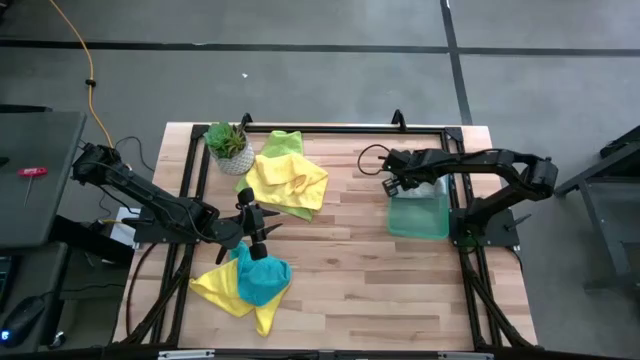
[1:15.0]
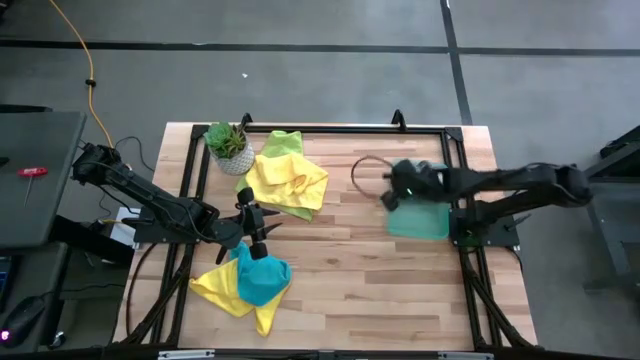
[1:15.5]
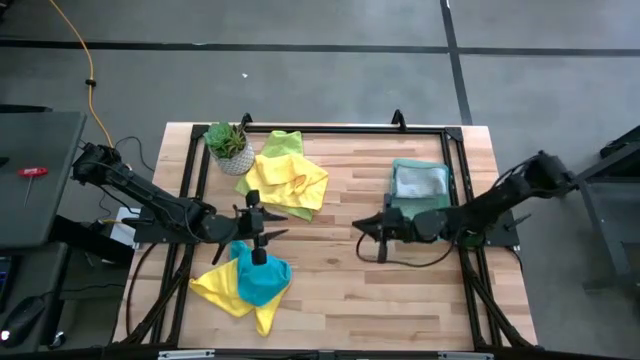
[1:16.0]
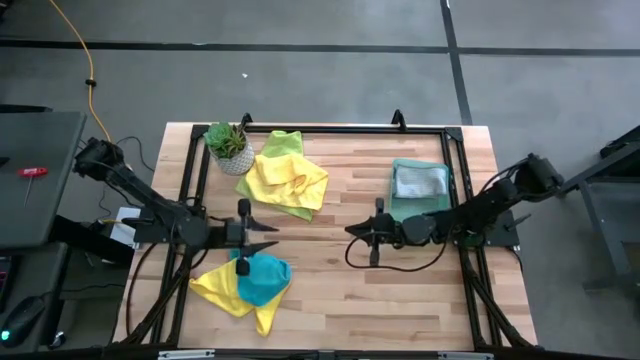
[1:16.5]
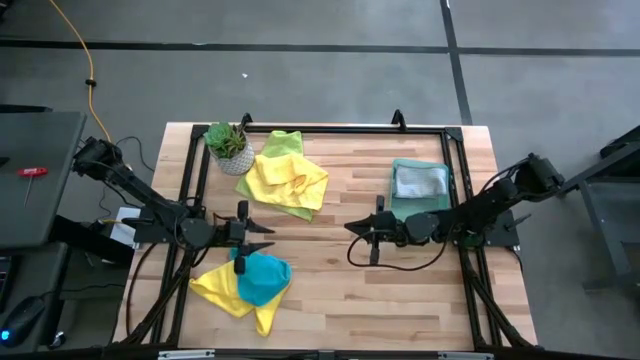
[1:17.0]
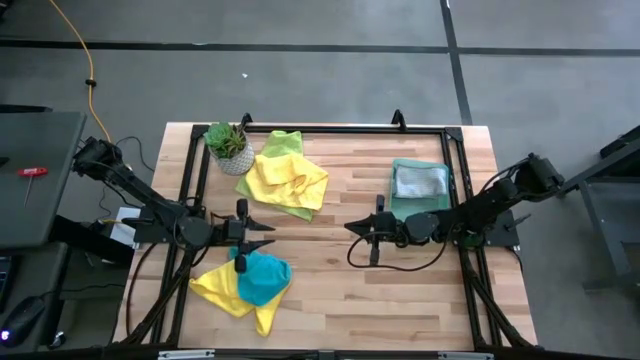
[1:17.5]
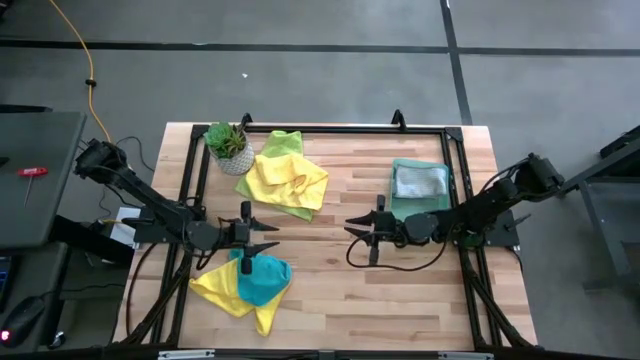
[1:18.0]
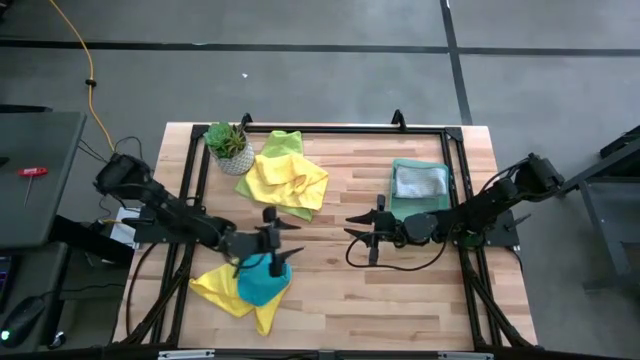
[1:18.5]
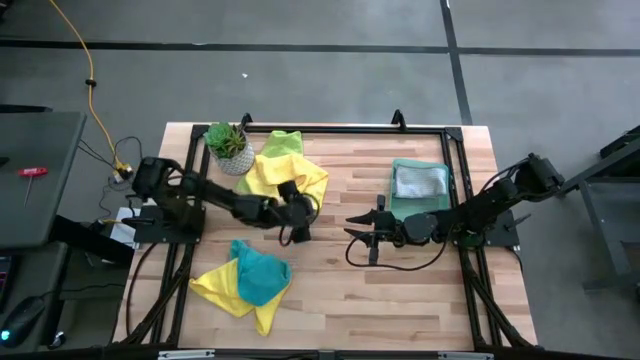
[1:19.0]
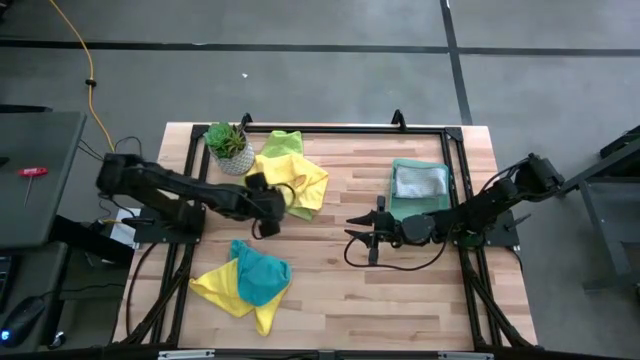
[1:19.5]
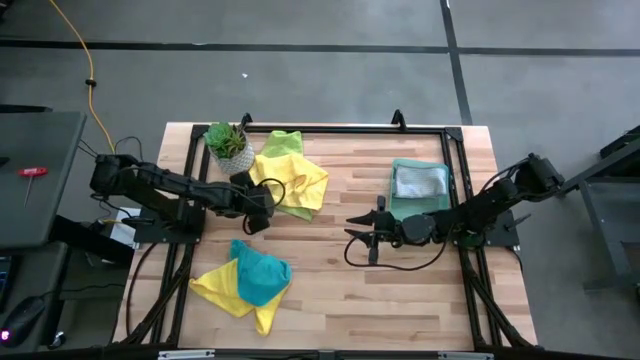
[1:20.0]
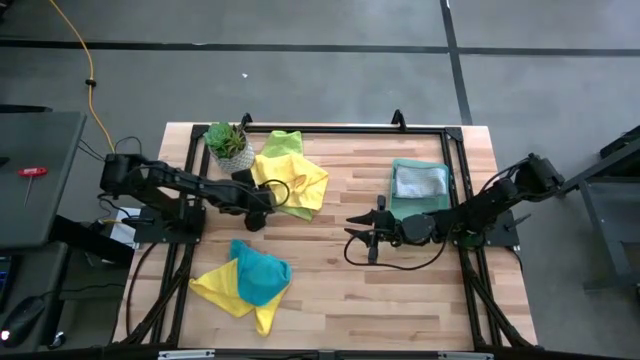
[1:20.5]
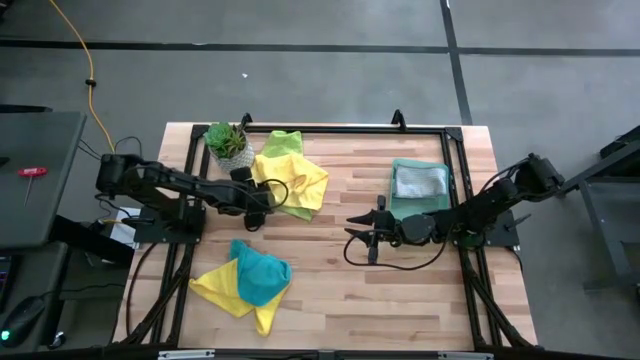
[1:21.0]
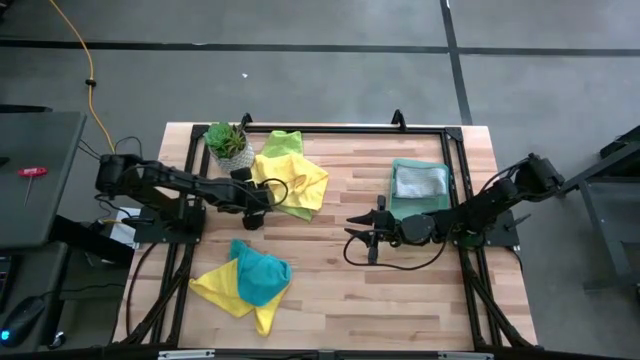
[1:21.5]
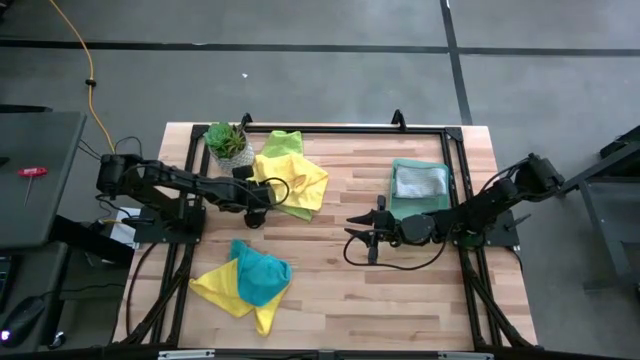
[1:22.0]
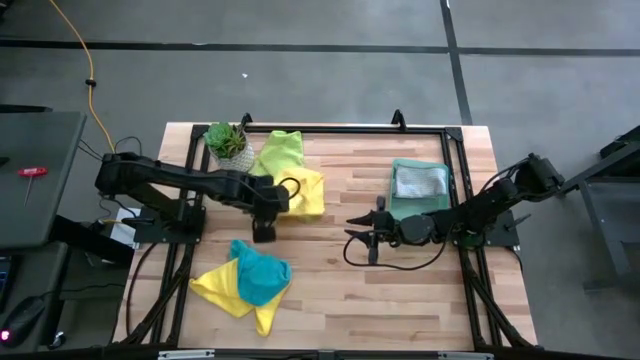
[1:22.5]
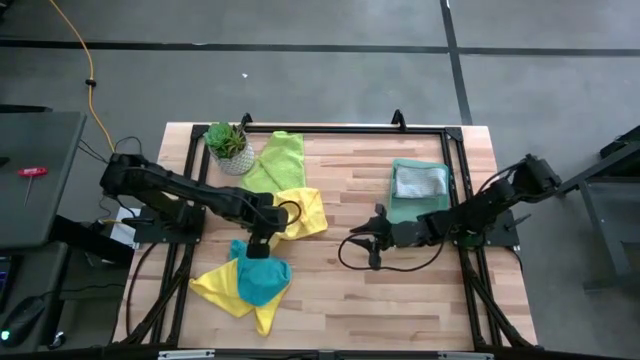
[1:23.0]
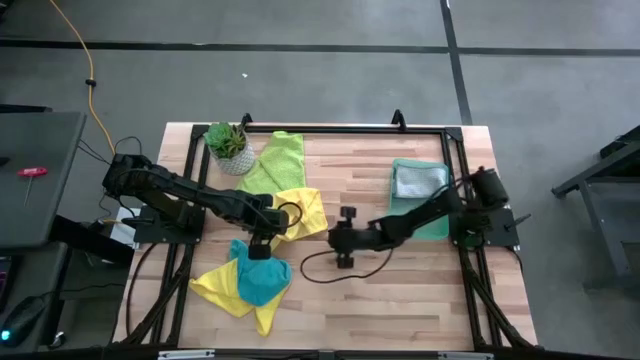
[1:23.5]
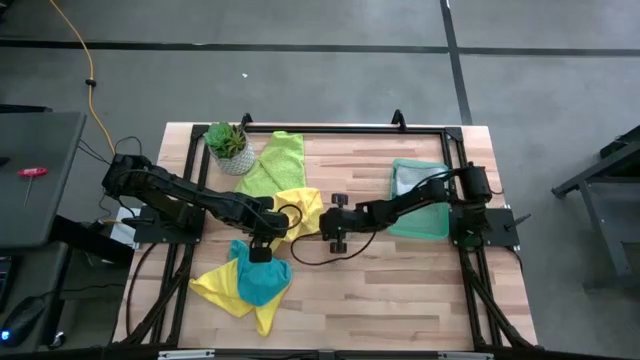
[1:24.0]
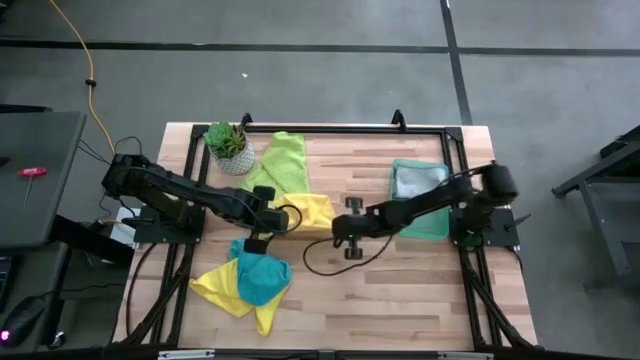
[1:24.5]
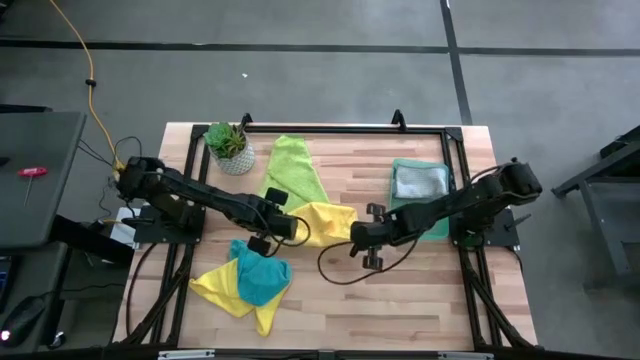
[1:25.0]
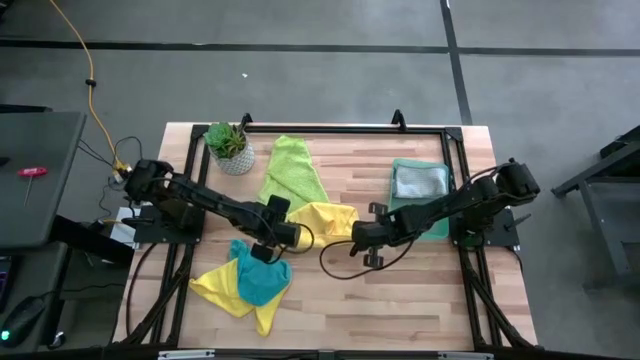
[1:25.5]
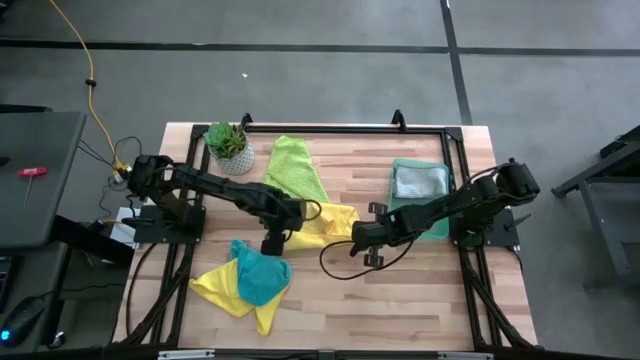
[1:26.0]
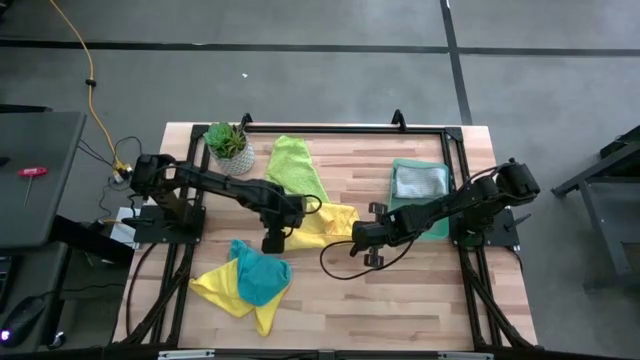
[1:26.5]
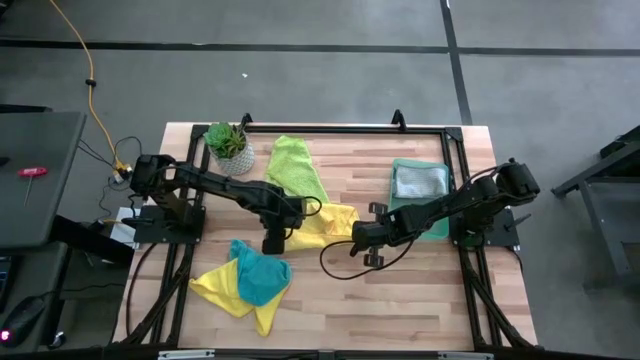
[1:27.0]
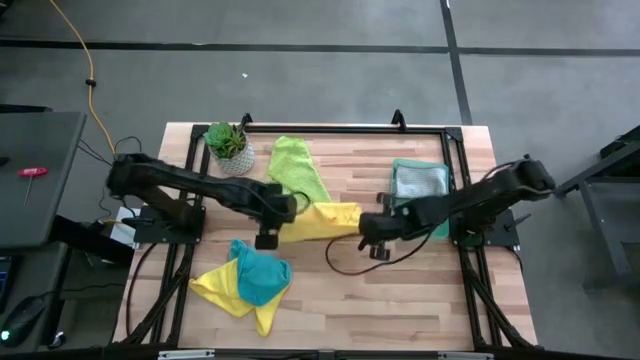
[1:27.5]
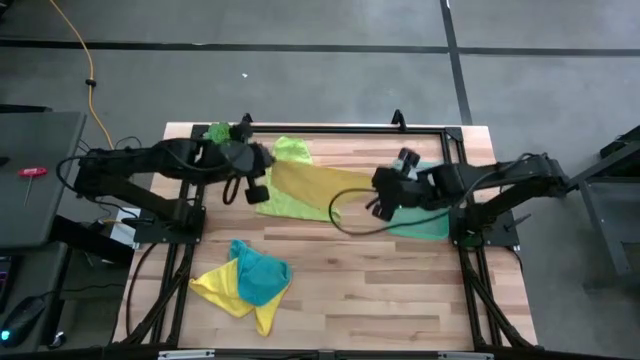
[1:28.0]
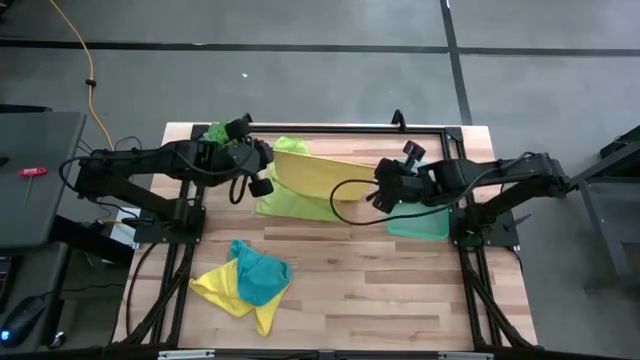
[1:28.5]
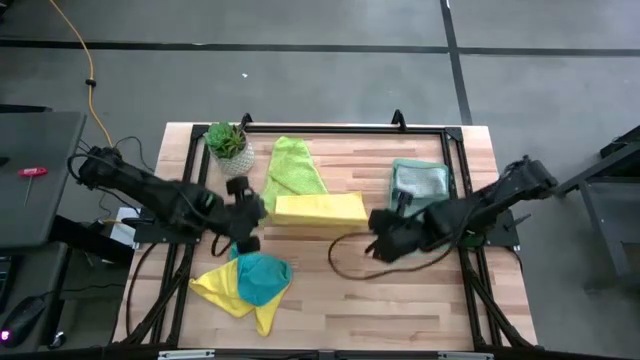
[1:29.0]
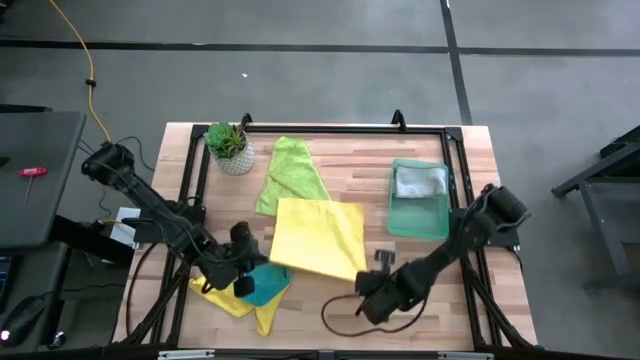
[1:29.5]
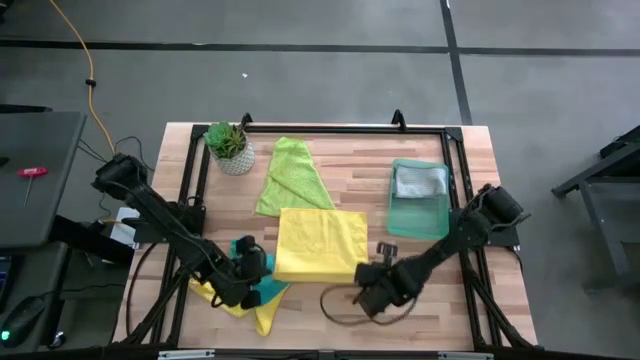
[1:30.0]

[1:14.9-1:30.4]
Task: Fold microfiber towels
Fold the top yellow microfiber cloth

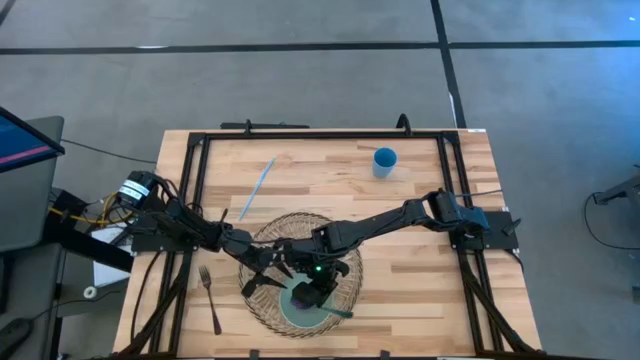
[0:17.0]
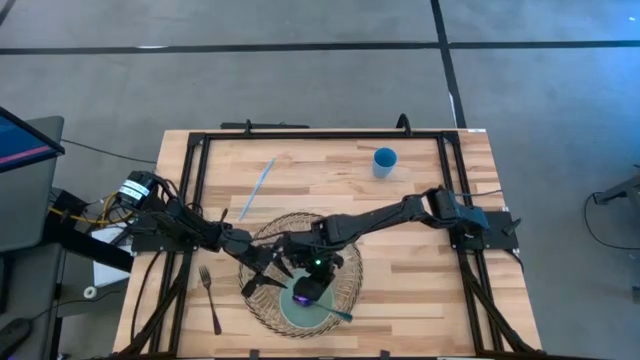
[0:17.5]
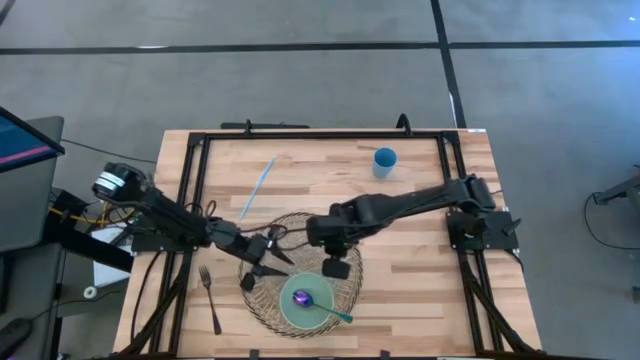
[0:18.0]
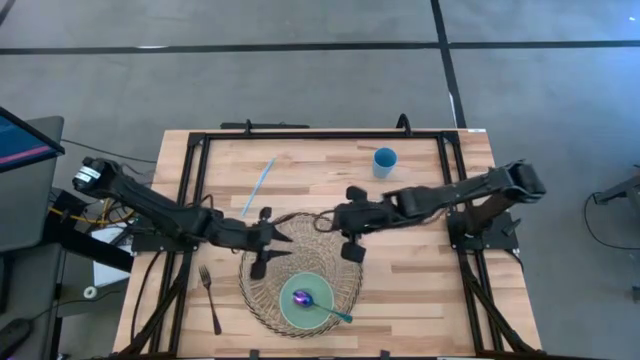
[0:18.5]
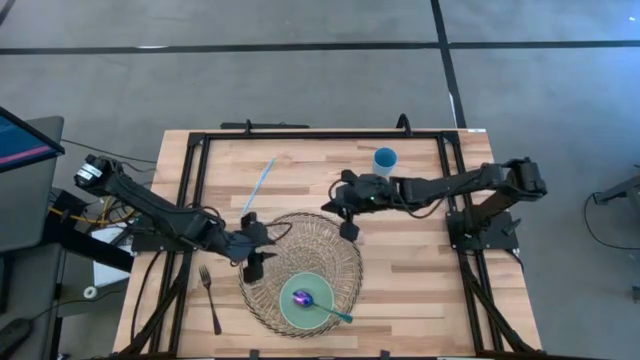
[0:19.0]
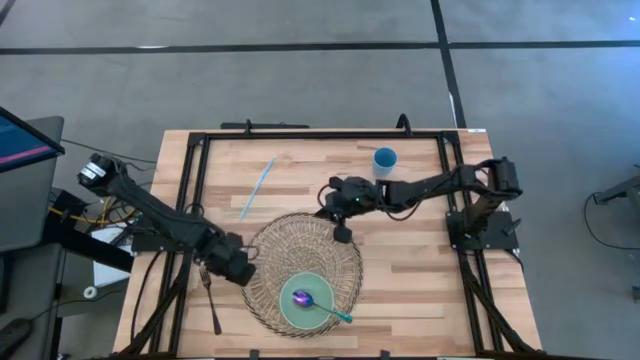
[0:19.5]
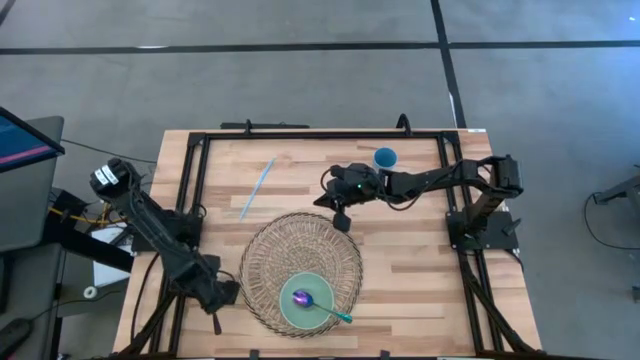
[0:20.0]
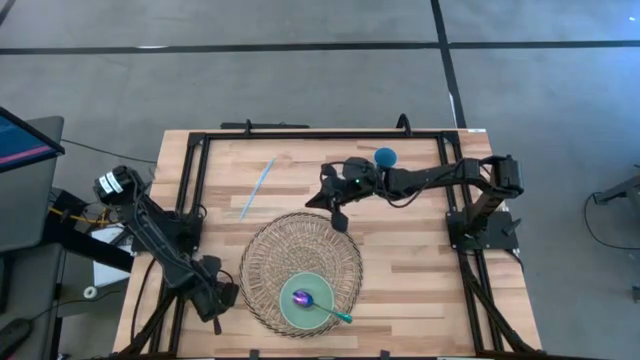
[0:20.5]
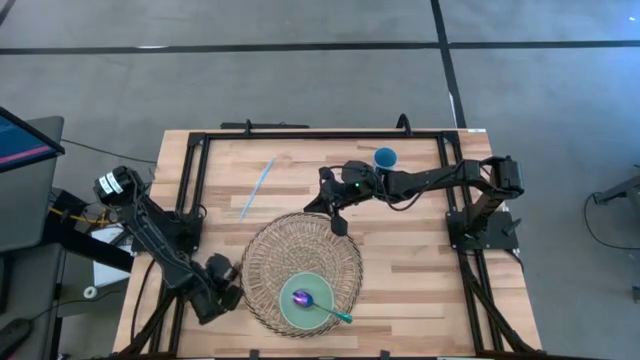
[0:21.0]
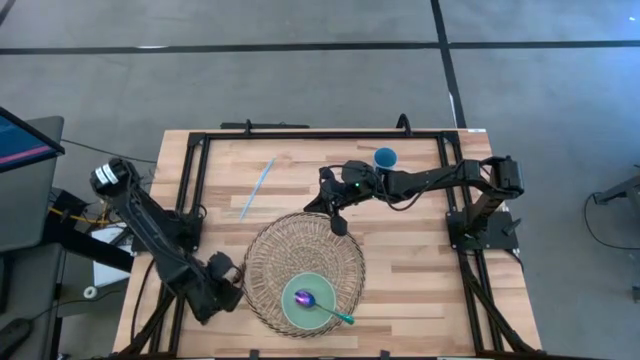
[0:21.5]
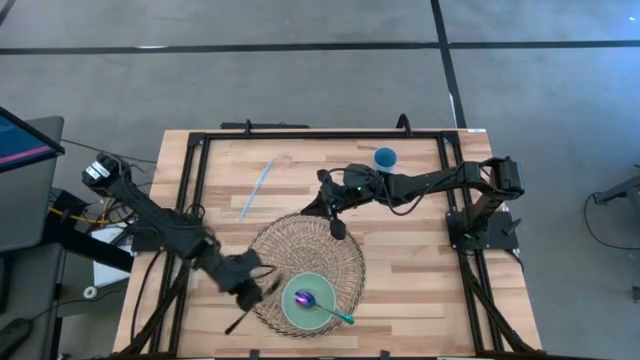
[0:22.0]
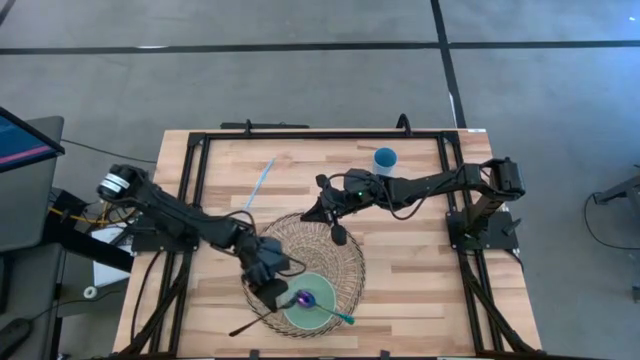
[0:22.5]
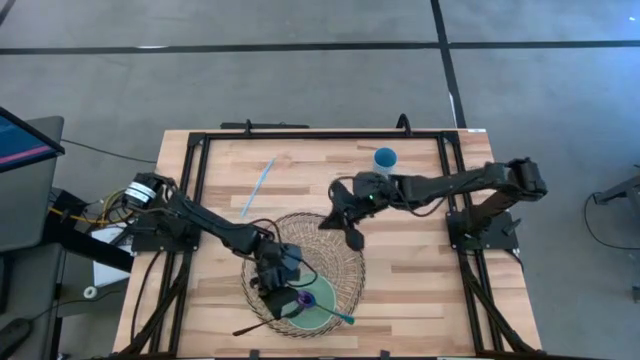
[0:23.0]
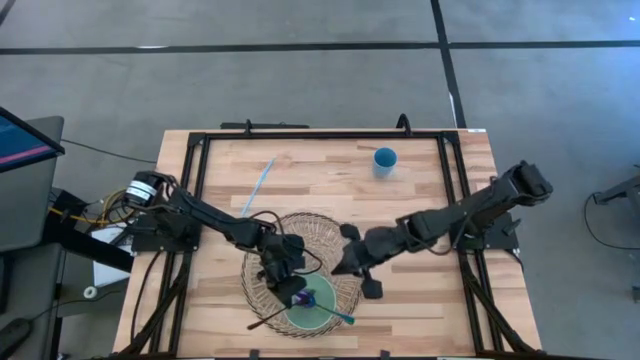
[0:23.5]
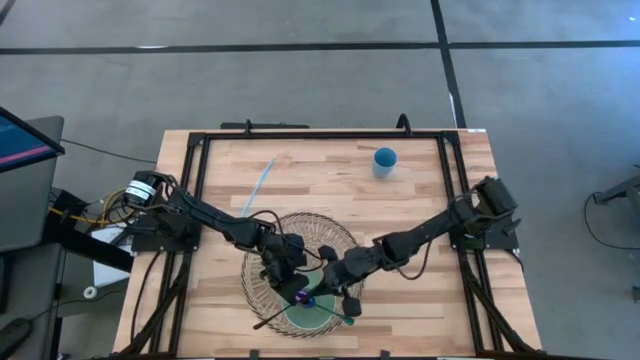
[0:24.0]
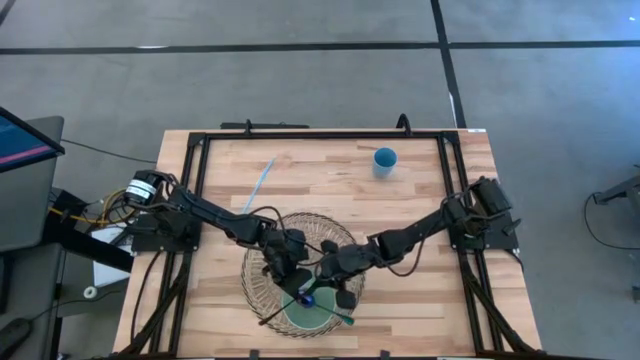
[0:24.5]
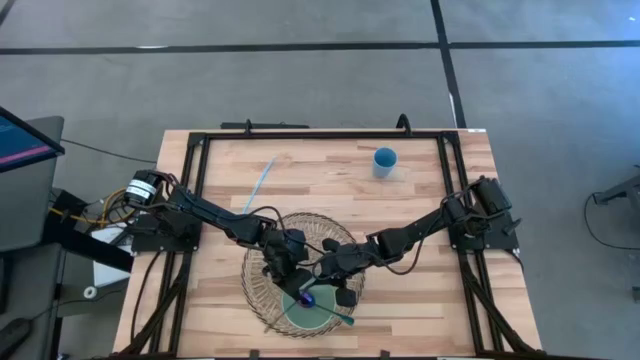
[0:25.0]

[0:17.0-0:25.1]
Task: Pick & Place Utensil
Put the black fork into the light blue bowl
